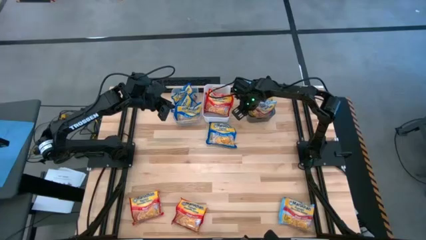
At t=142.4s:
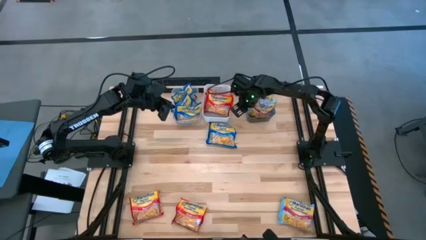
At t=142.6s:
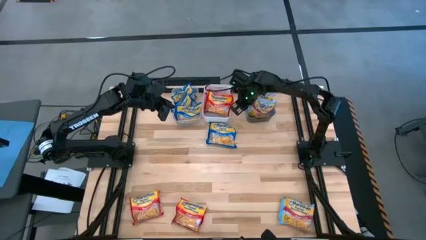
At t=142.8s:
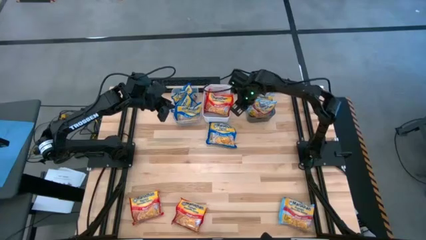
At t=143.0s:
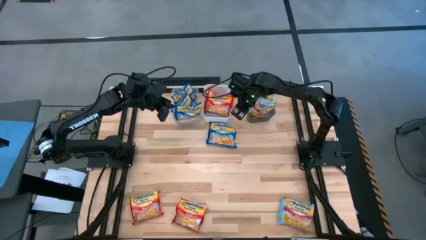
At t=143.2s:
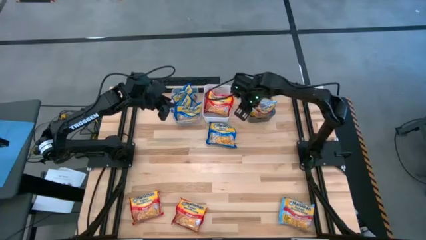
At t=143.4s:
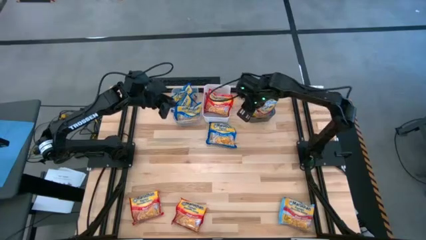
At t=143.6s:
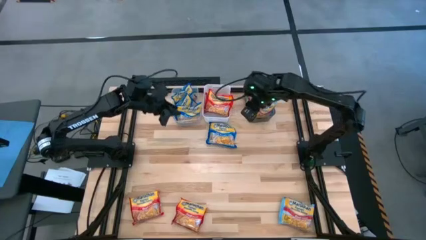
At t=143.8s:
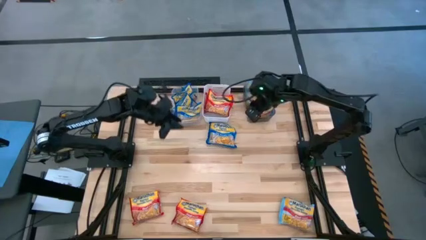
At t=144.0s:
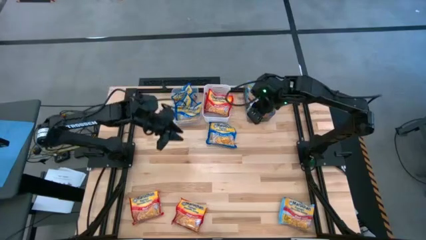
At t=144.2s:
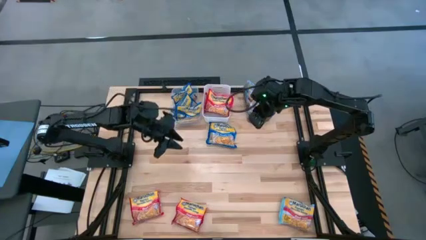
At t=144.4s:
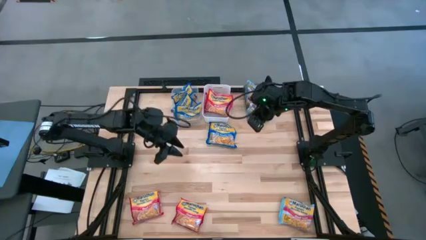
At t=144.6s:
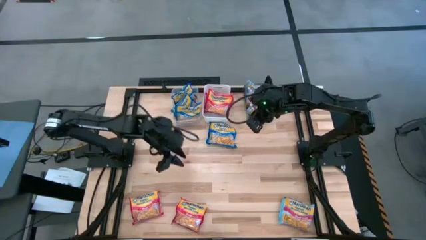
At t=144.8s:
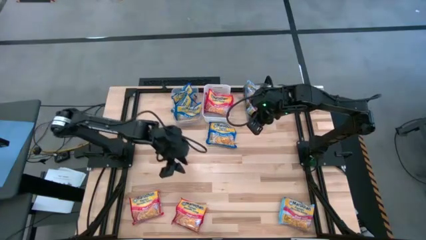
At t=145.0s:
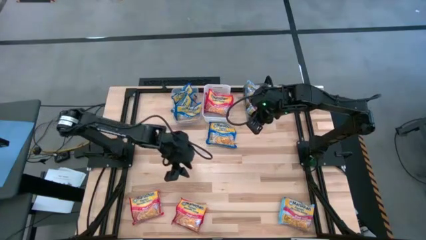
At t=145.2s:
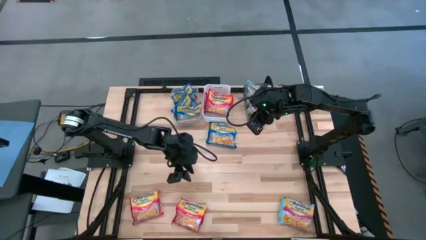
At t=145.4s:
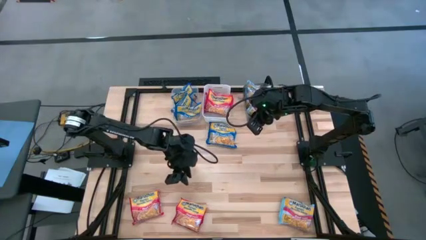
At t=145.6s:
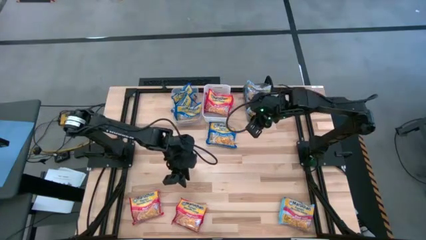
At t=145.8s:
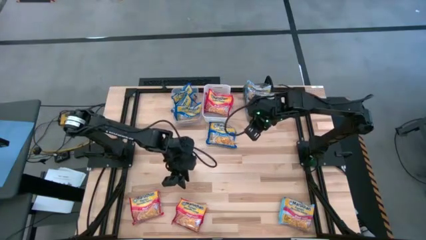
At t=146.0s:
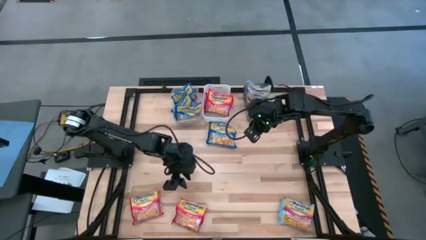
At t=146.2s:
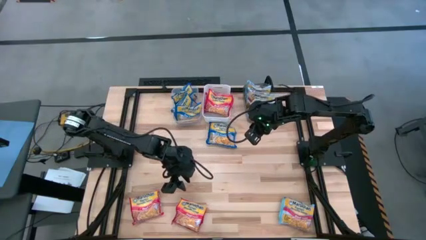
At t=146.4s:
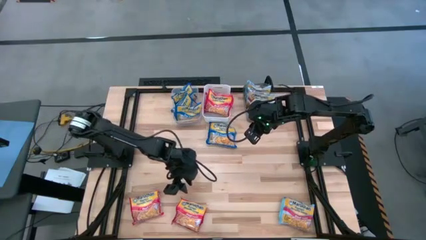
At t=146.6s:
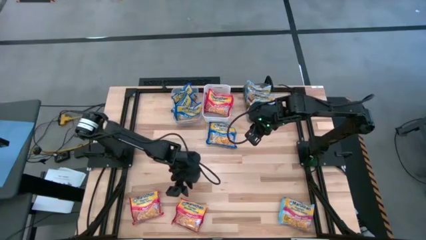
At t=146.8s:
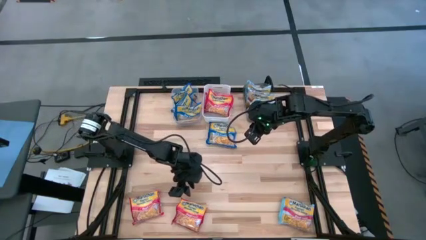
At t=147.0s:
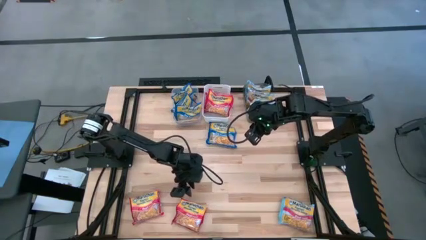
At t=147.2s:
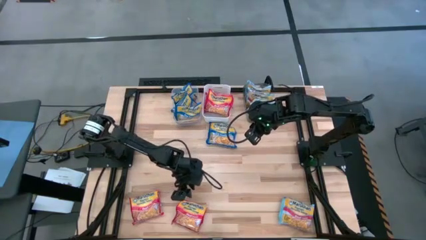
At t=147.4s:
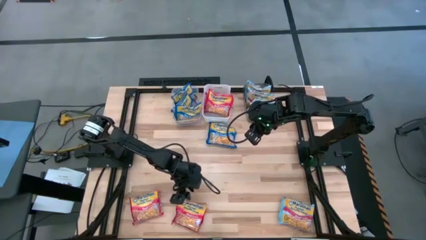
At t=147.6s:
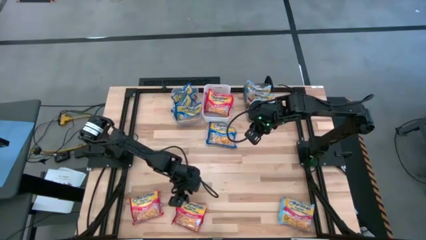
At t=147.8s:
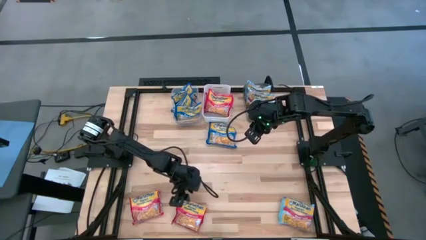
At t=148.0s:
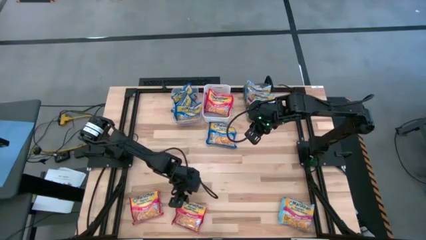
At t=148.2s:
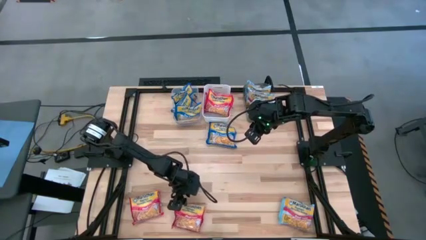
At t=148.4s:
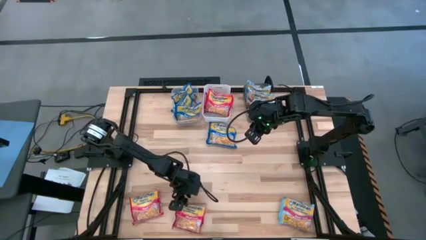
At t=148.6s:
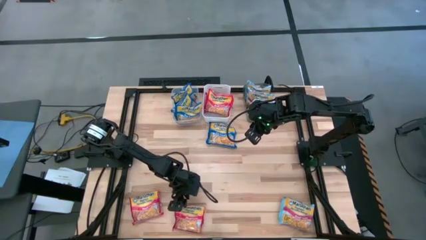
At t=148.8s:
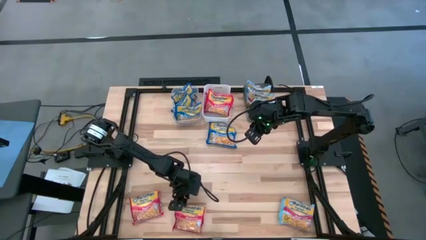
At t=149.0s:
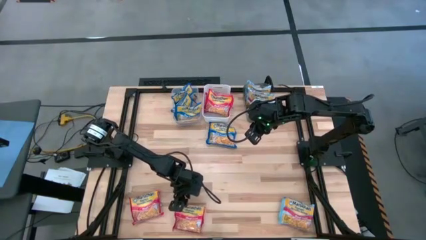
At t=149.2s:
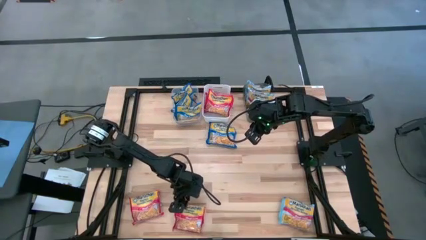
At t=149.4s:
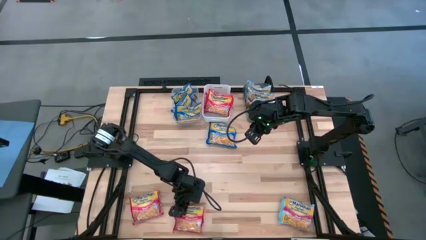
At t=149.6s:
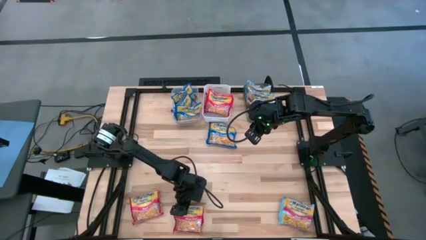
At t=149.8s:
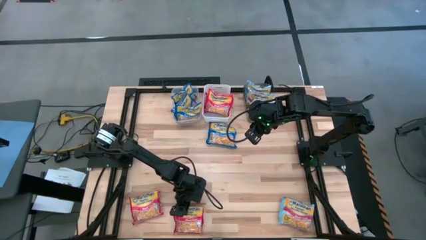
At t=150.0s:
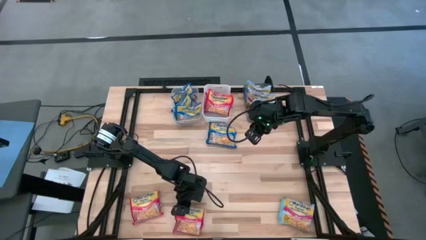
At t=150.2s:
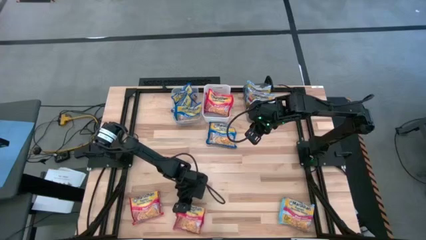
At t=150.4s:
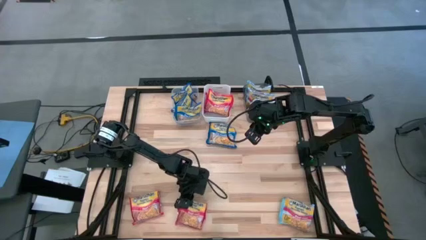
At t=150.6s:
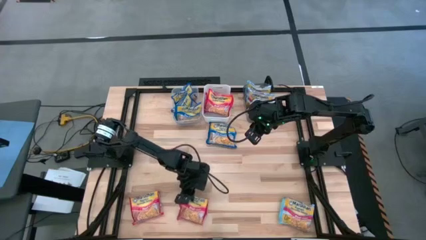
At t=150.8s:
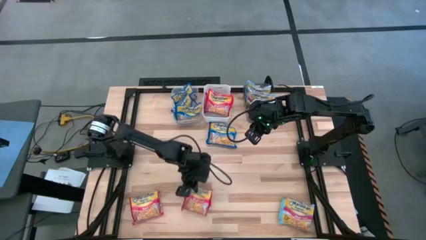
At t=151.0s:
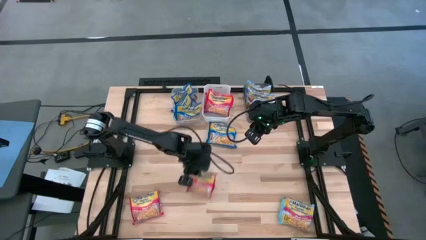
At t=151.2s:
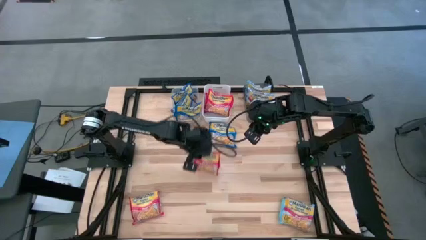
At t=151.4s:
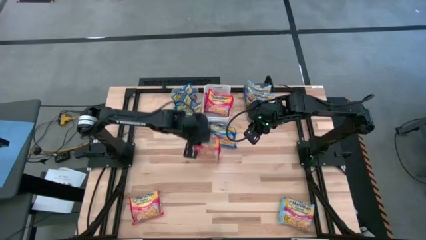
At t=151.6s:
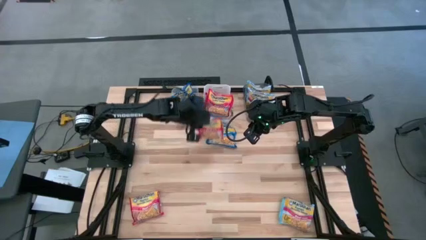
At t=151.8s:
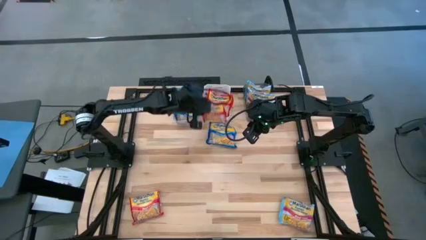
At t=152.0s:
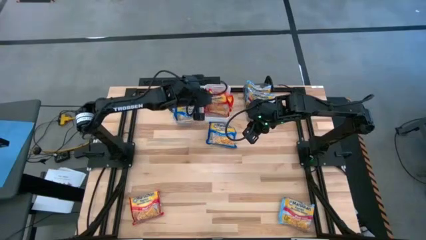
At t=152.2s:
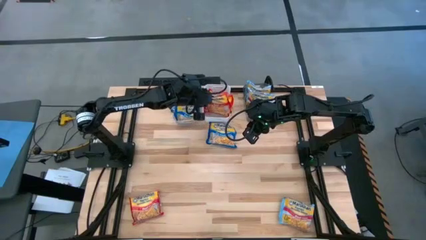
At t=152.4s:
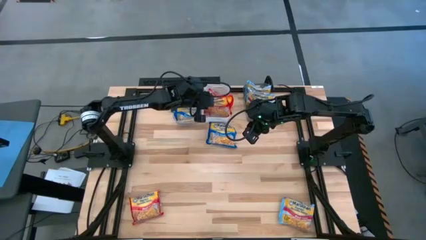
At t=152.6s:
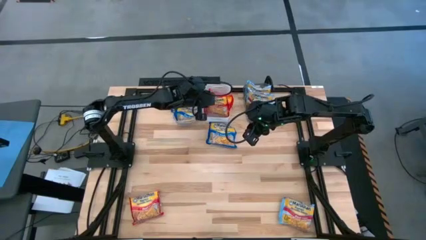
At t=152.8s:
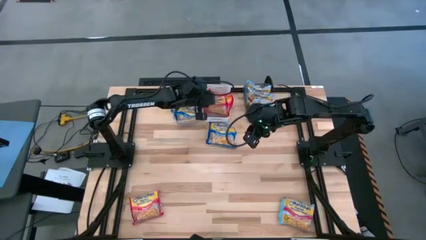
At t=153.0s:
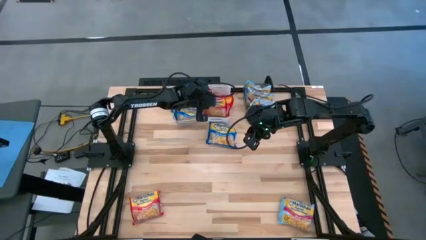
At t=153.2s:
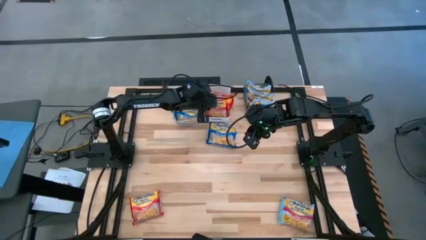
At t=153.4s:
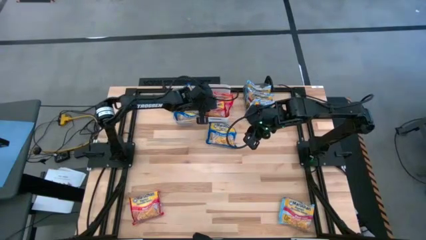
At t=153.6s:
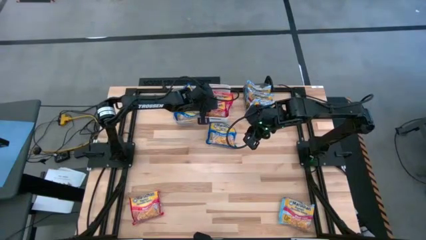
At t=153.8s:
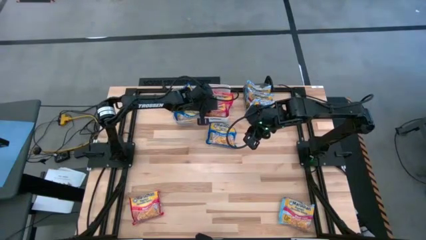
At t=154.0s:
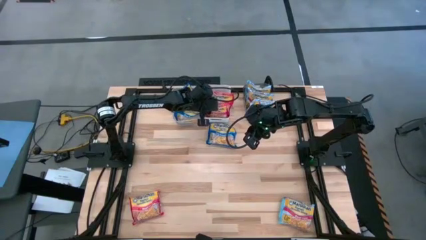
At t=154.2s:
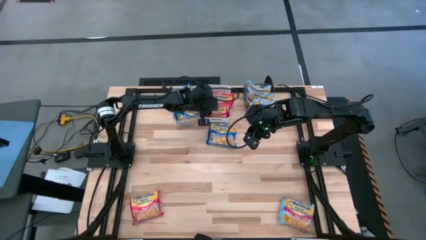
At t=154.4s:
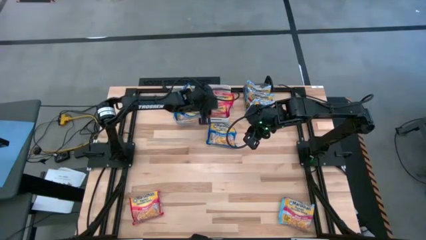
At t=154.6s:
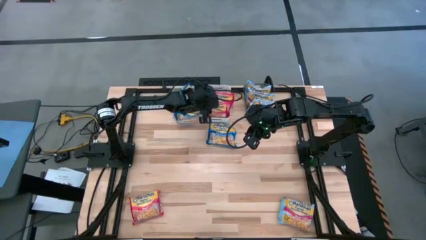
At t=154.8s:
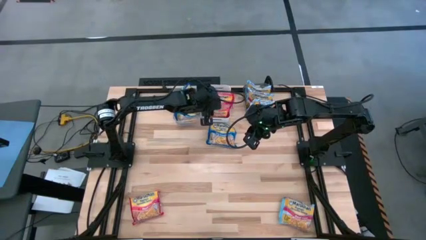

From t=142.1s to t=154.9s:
Task: Sort Maruchan noodles
Put the red noodle pack into the white bin

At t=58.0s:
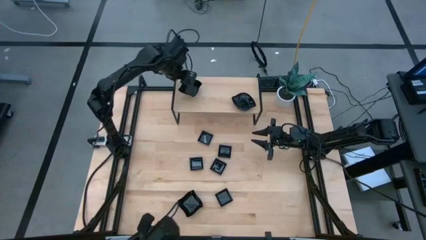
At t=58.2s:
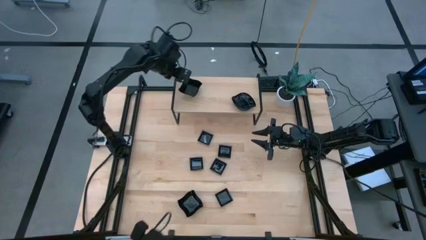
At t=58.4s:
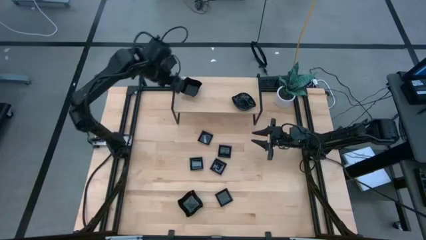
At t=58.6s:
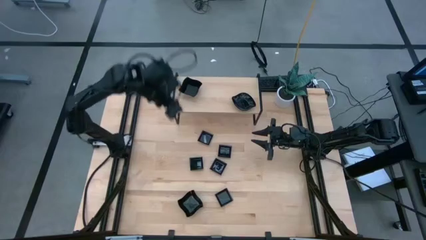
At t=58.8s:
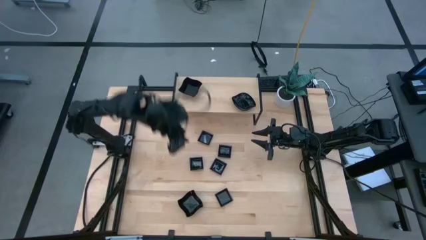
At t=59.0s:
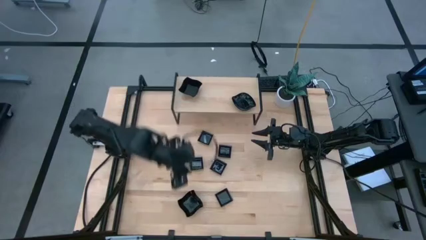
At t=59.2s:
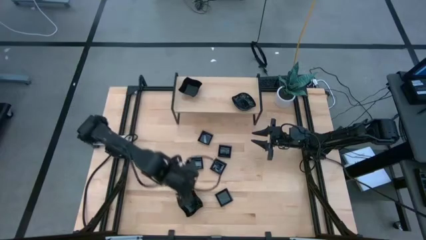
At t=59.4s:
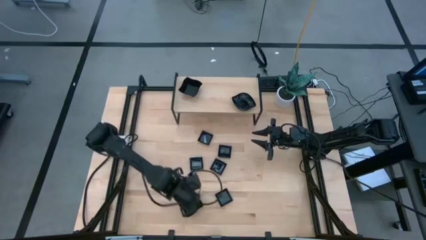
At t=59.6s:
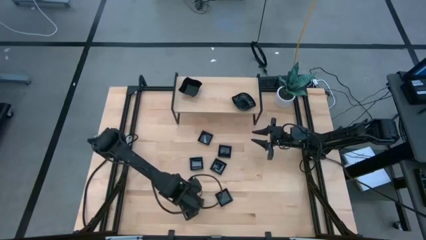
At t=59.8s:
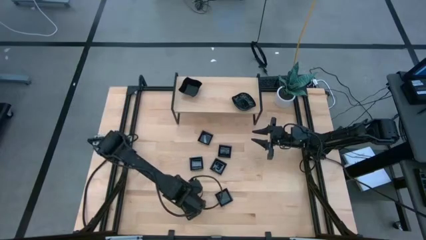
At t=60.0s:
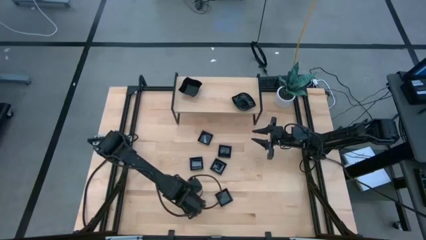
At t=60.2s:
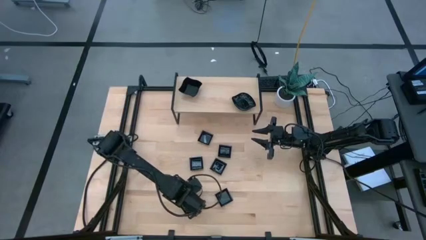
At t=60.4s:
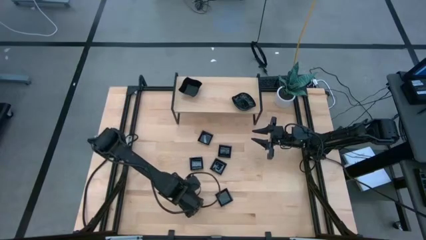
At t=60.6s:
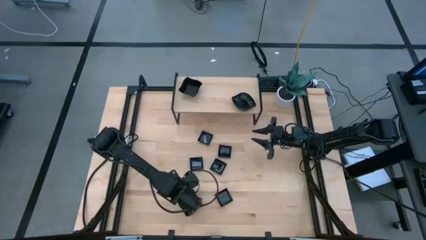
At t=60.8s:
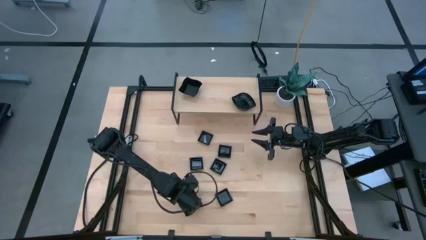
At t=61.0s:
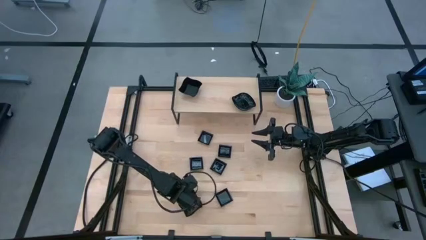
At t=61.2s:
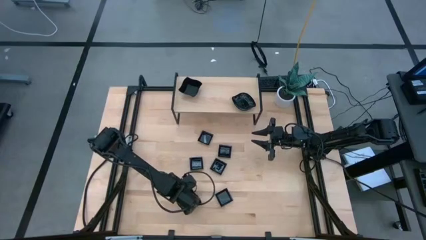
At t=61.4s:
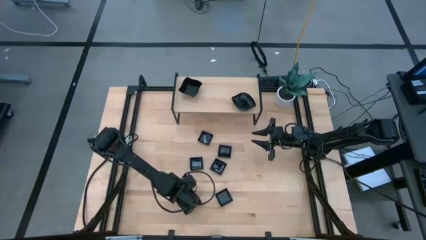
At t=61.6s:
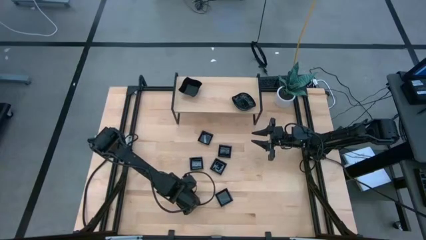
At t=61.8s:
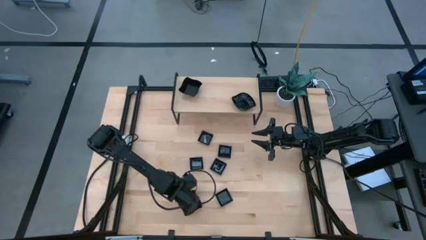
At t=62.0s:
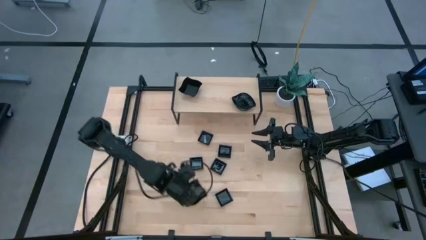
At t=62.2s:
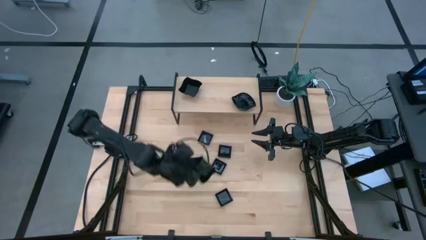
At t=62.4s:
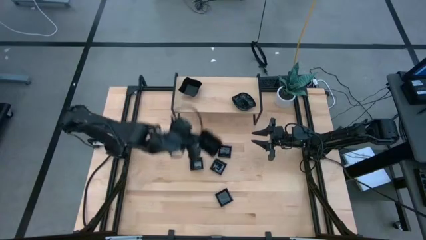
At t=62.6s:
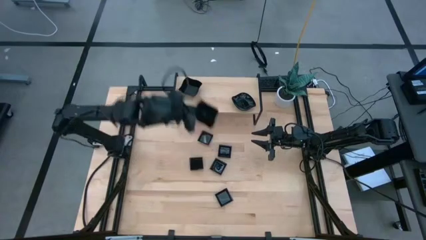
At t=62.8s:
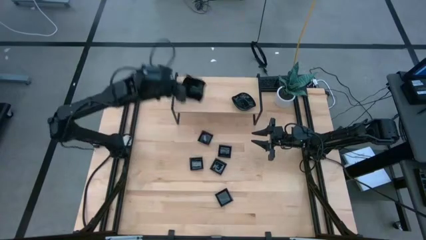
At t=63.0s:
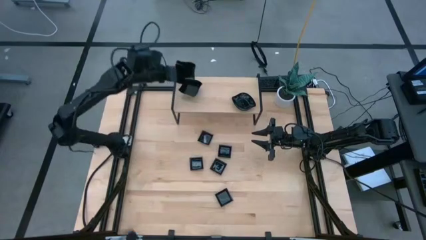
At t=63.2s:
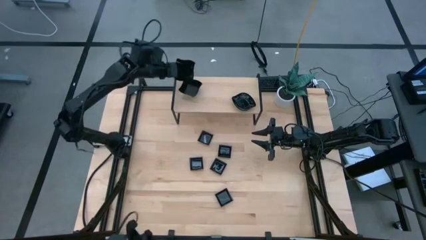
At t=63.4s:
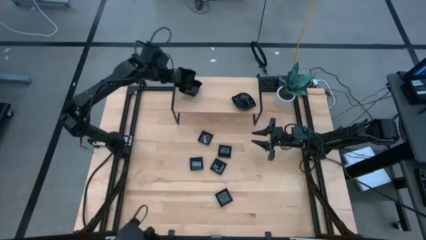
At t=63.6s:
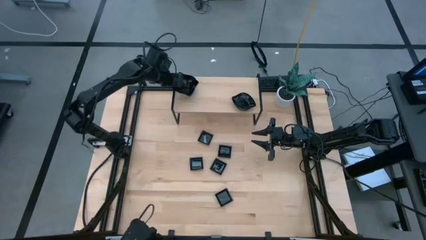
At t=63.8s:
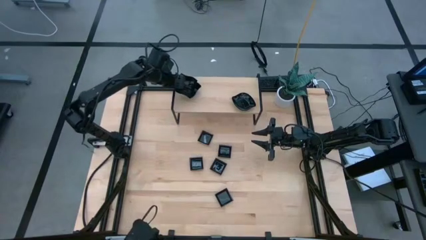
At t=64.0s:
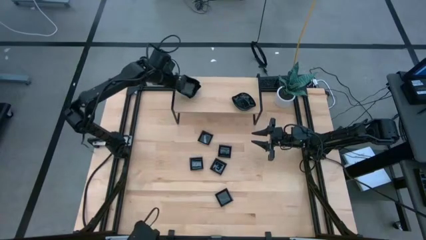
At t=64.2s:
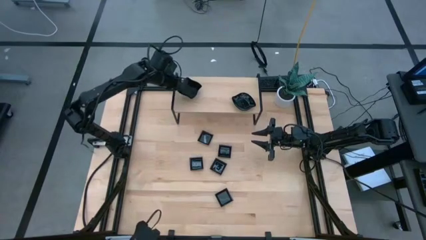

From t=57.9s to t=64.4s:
Task: Pick & Place Mini shaped plates
Stack the distorted square plate on top of the other distorted square plates on the shelf
